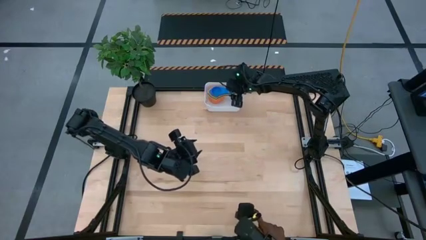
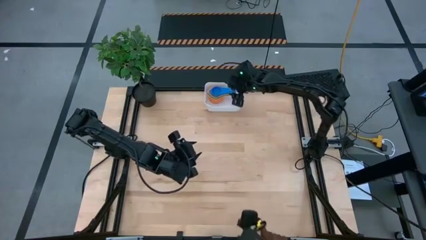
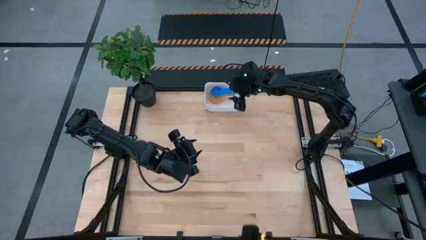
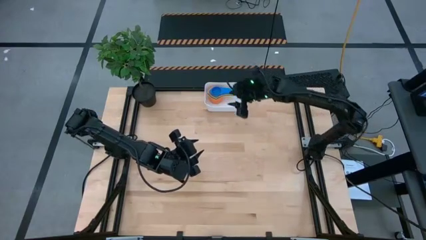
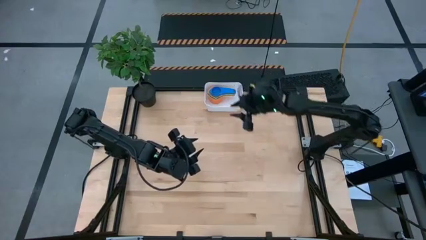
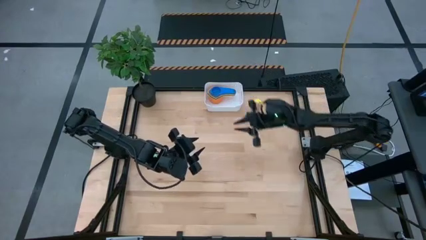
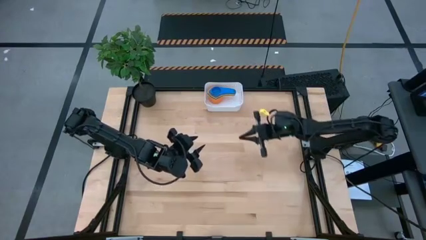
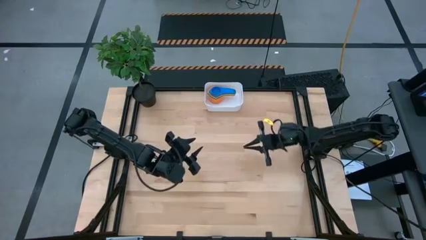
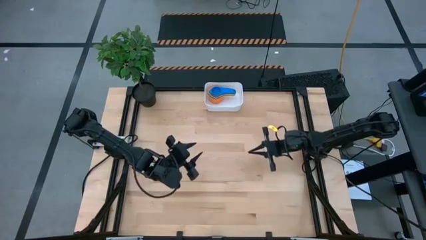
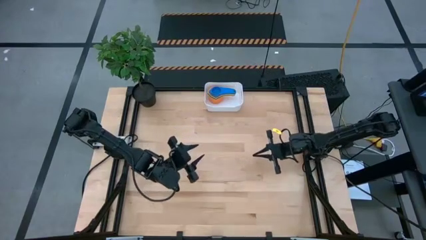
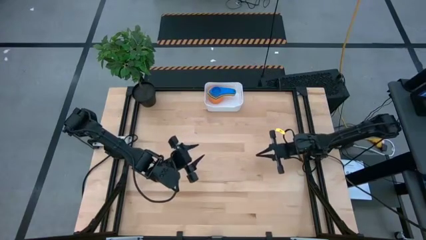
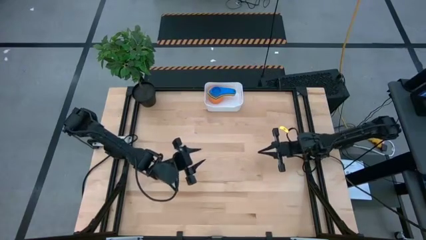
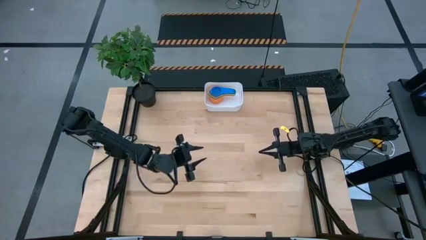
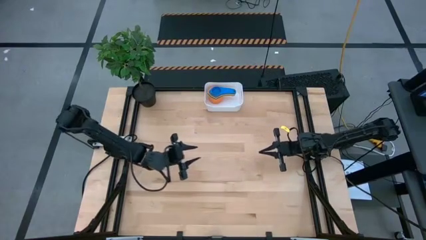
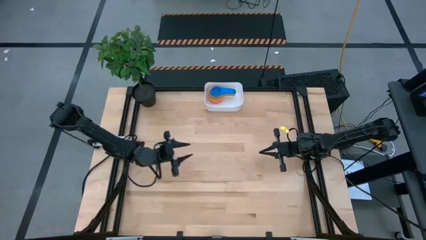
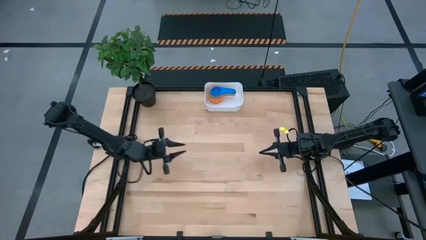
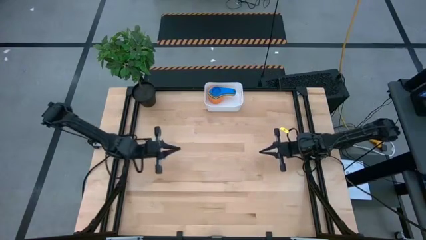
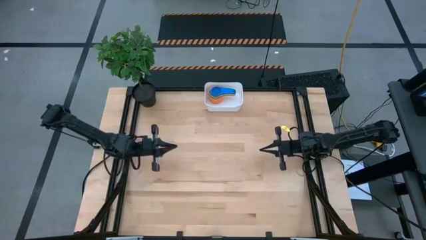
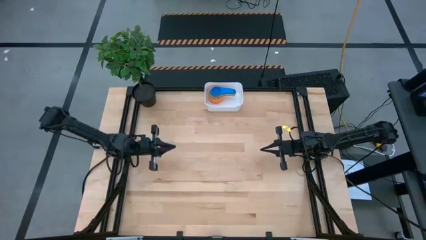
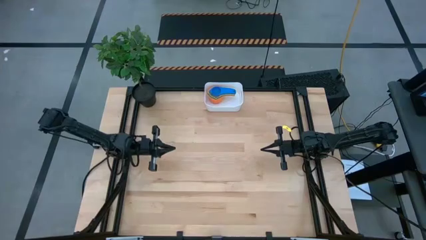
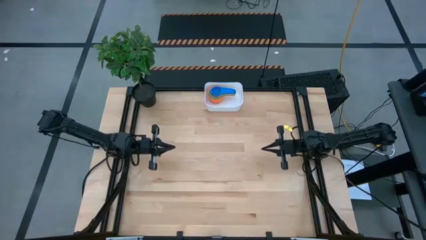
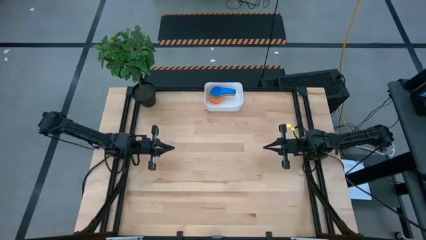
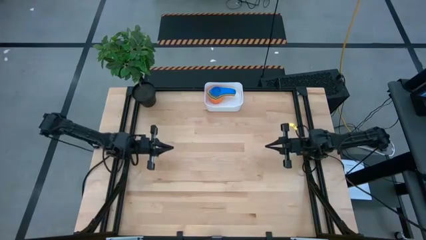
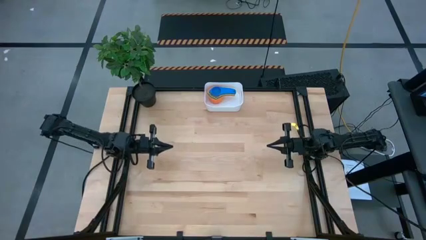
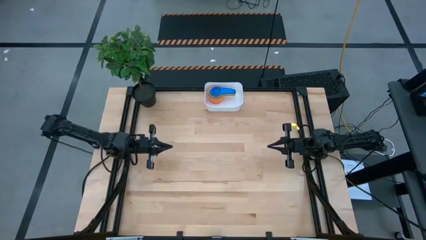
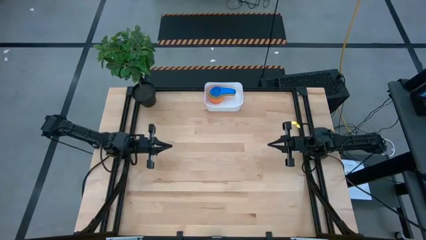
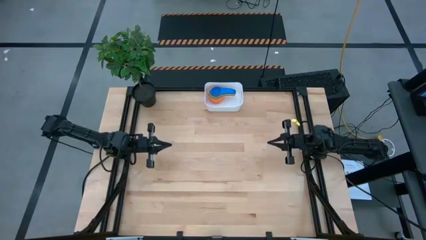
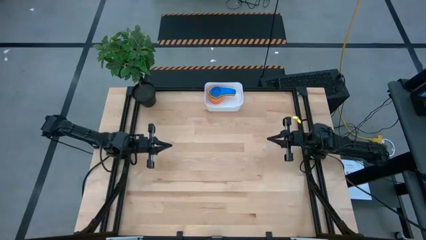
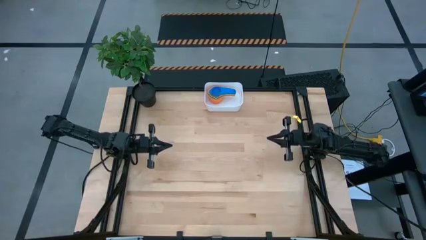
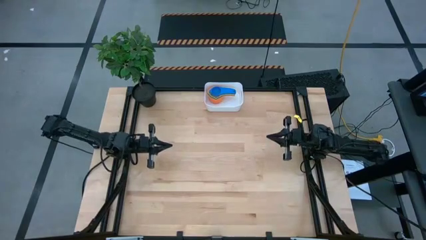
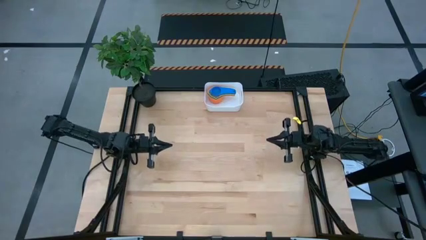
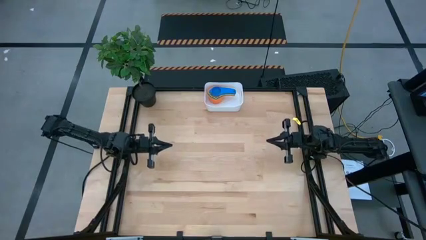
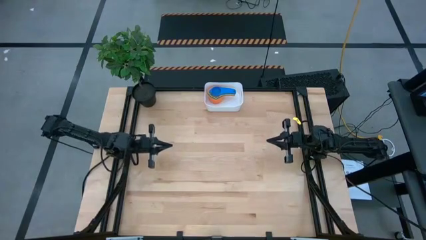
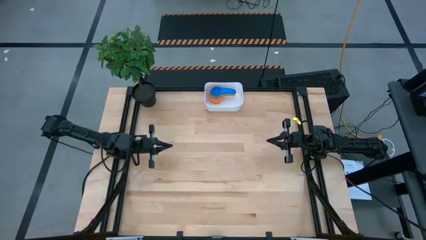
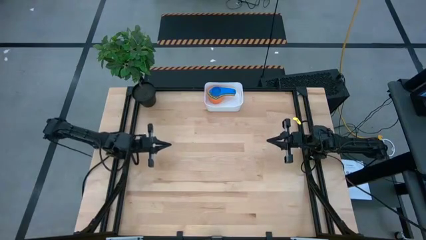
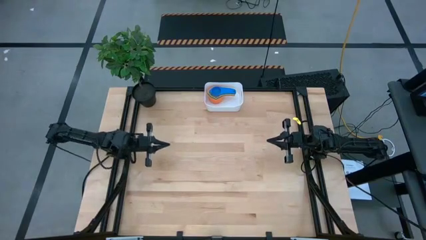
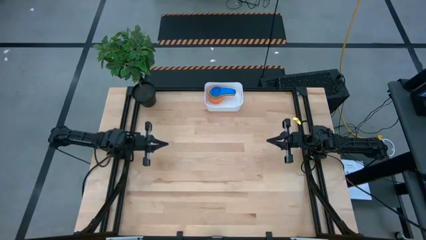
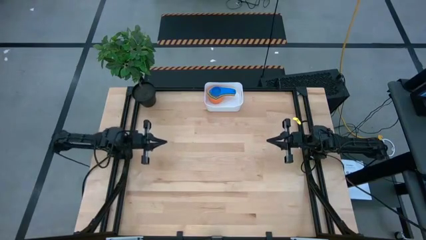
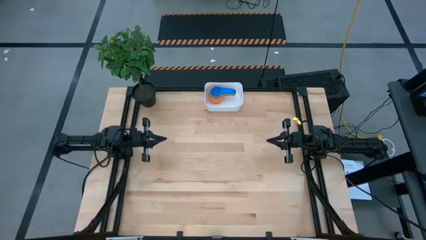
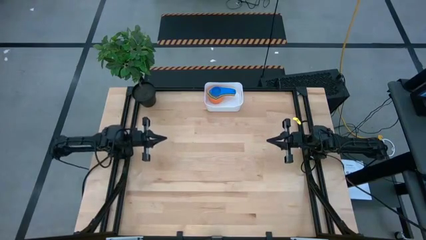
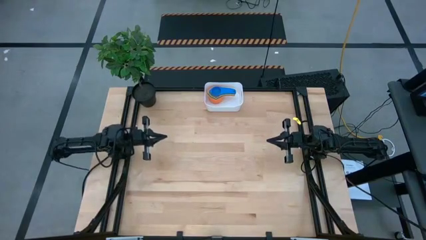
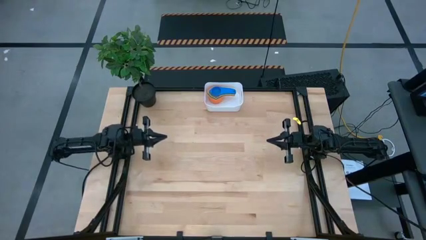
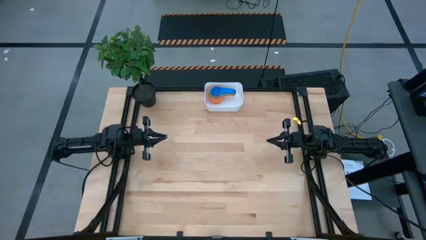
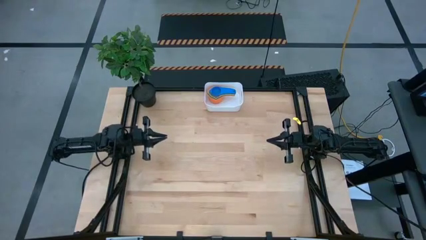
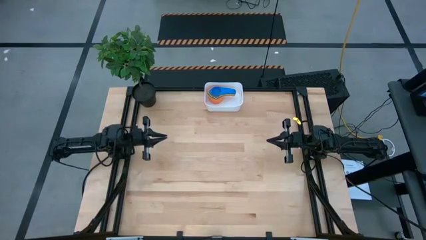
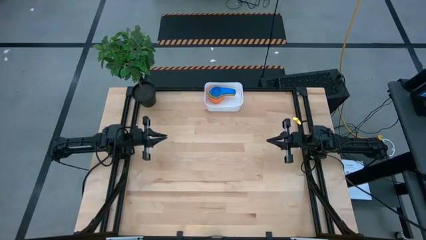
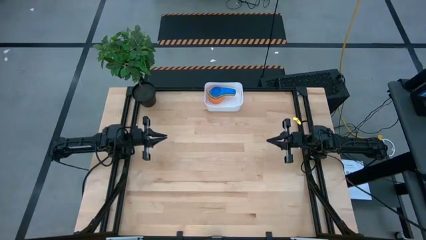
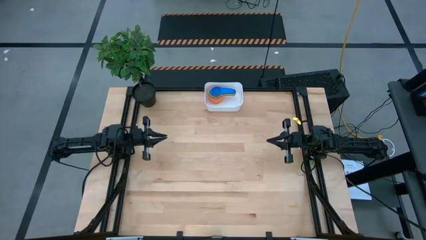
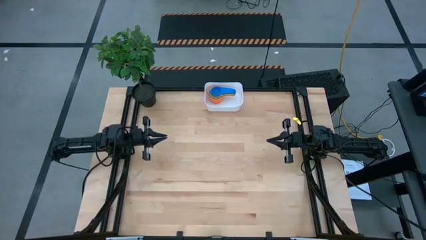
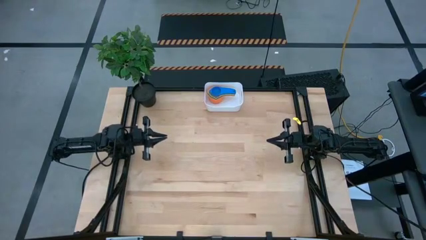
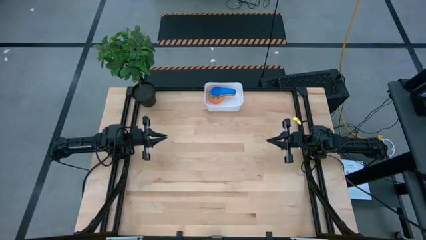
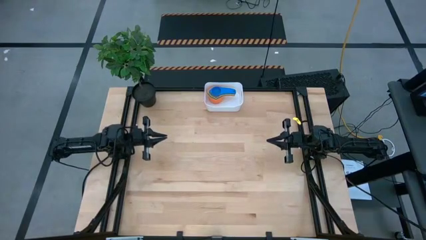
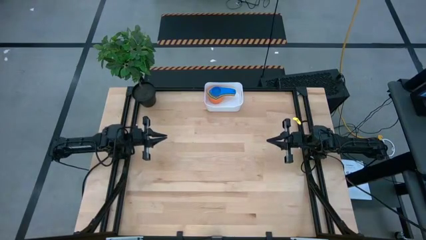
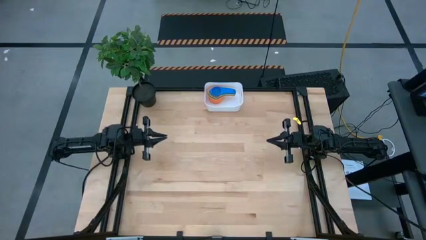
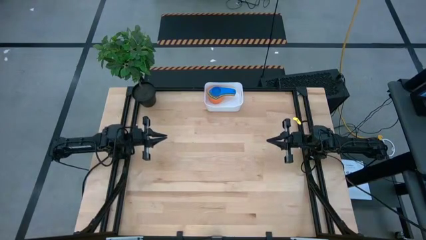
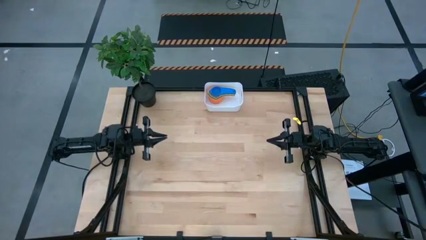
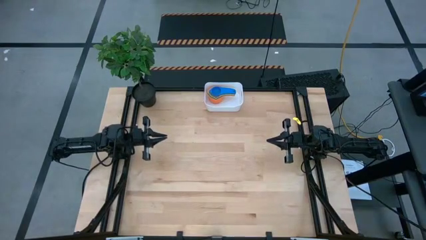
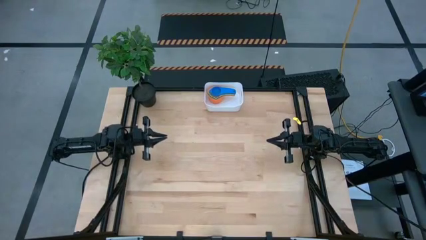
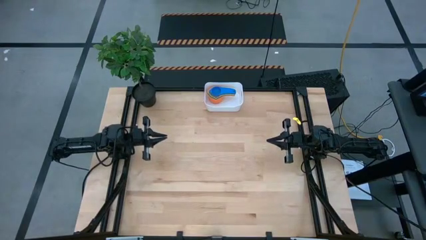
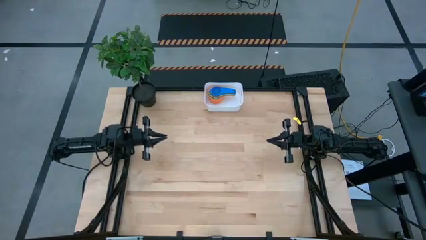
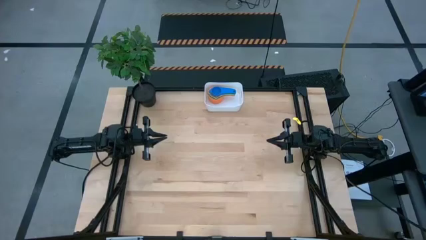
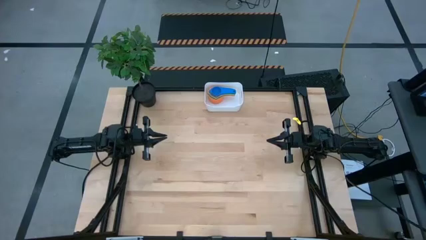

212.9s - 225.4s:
Task: Nest measuring cups in basket
Return to Home Position
